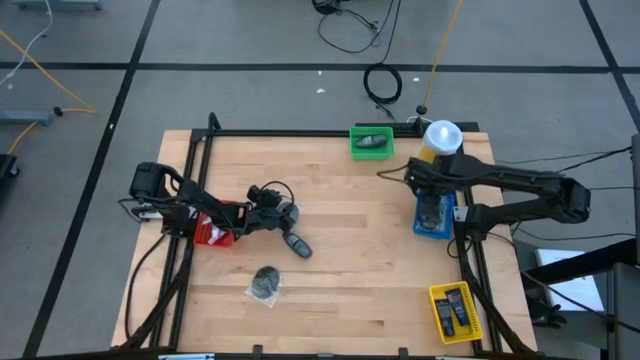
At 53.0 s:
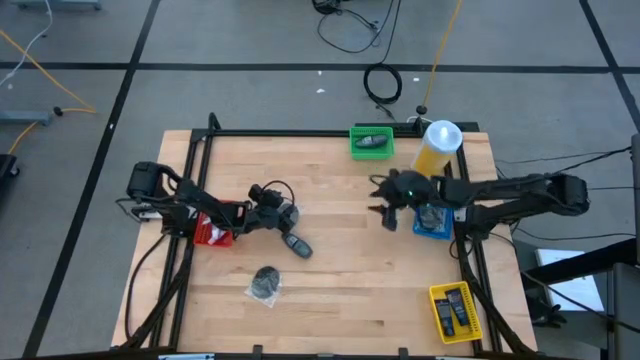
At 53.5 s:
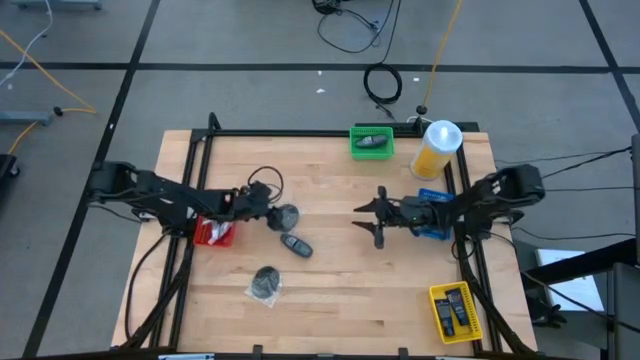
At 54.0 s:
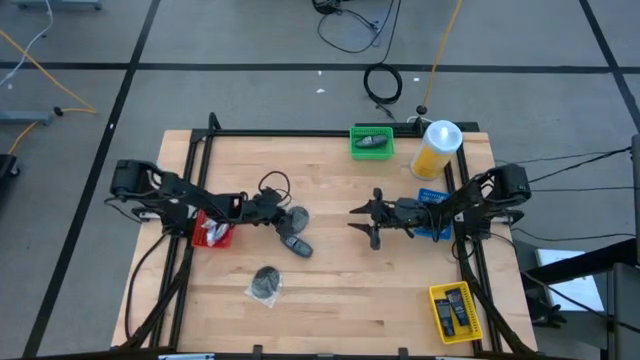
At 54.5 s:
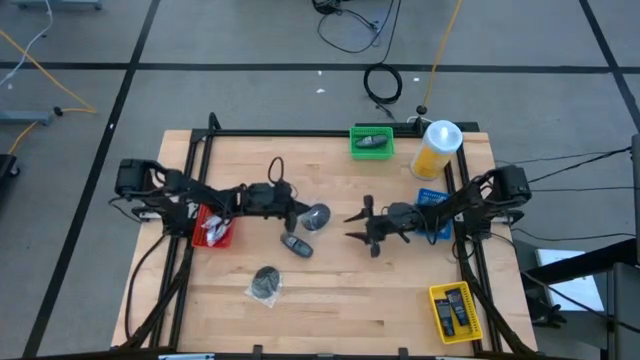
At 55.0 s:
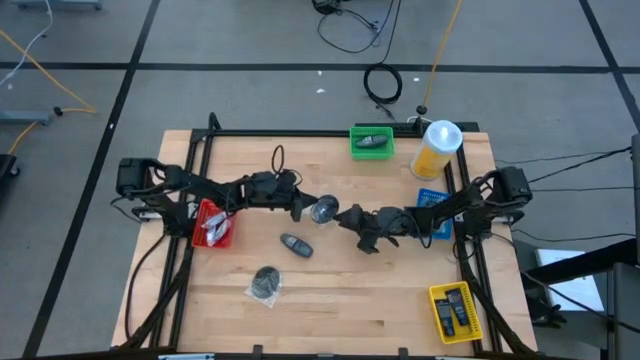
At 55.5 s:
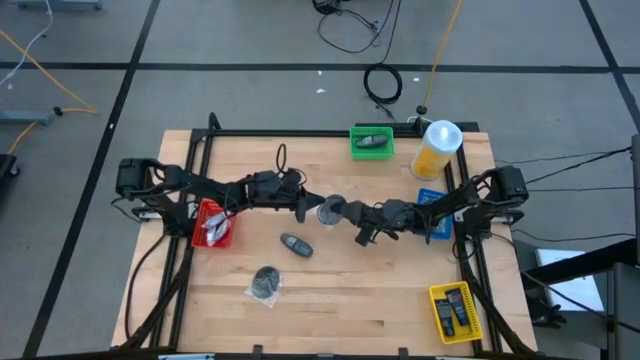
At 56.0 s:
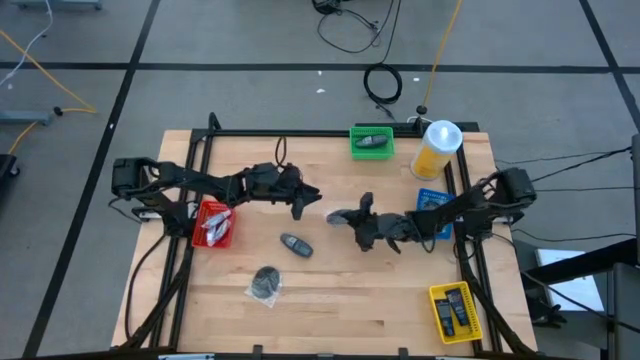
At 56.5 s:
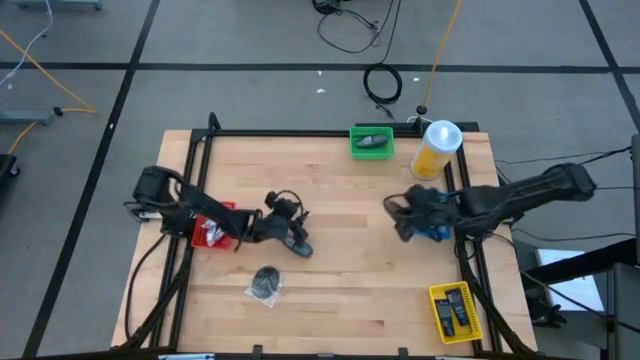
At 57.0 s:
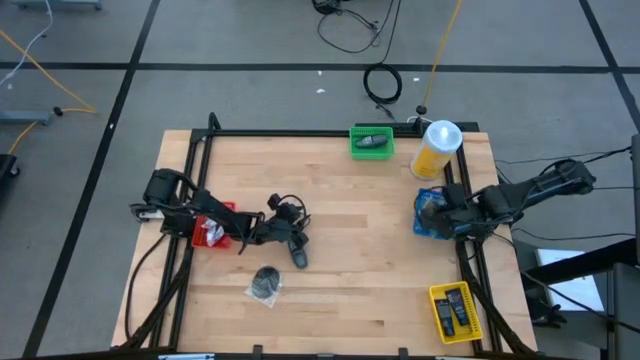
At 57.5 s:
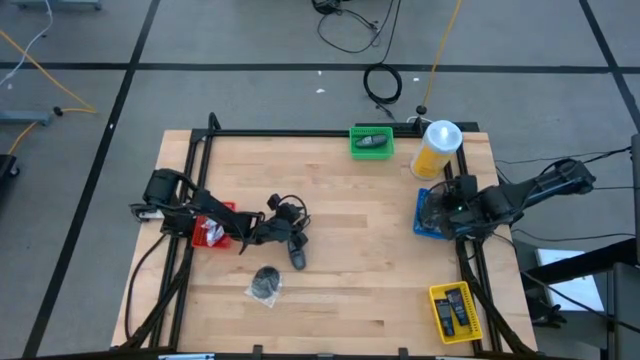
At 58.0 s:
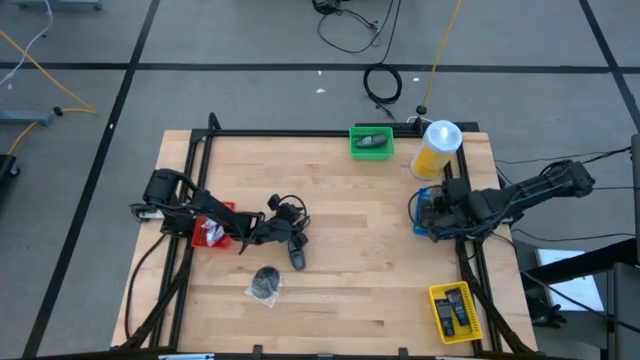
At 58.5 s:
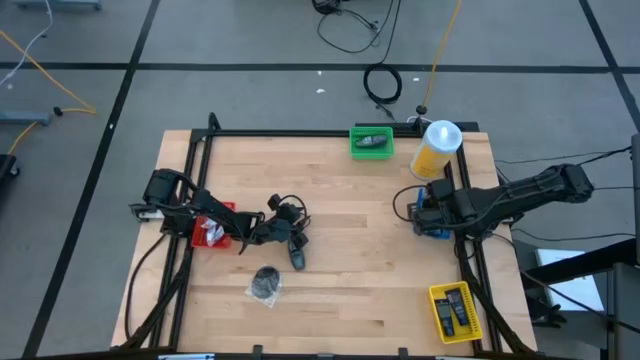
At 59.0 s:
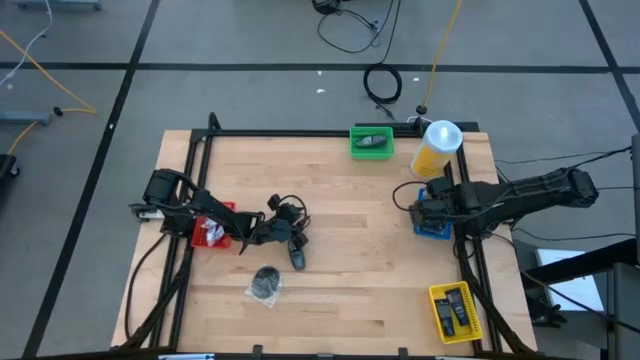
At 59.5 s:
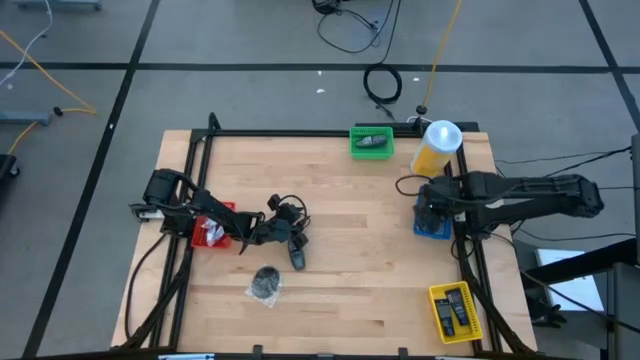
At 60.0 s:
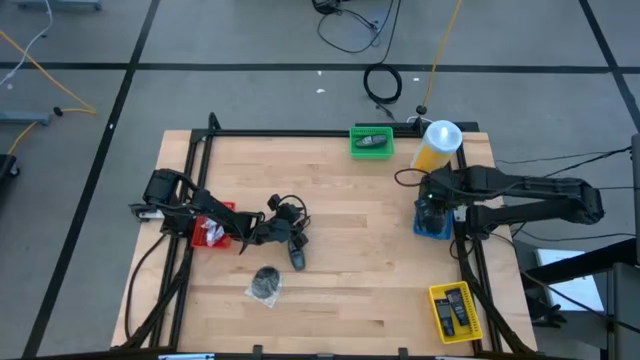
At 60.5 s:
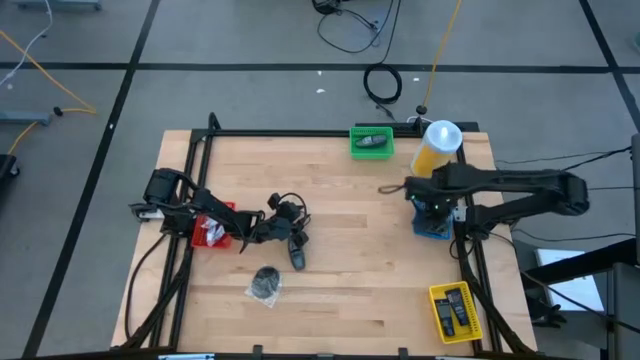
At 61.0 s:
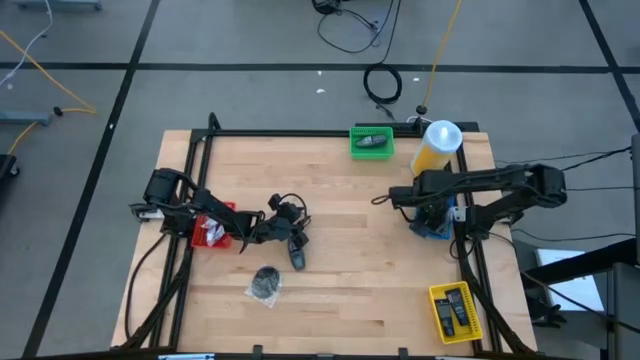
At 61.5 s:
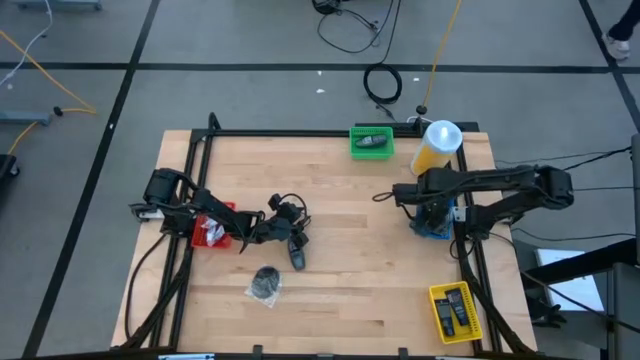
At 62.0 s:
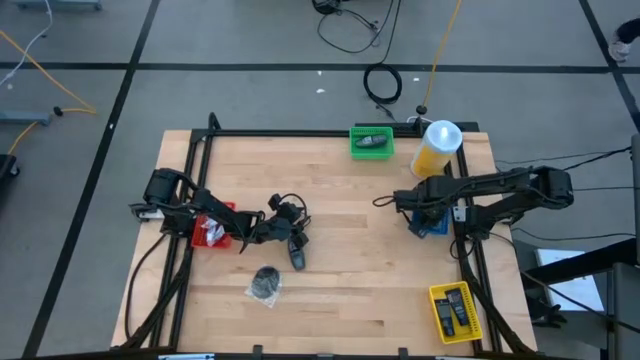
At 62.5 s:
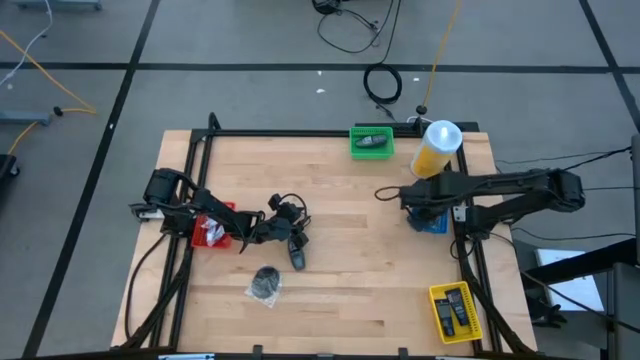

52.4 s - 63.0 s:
Task: Pick & Place Travel size toiletries
Put the black hairbrush into the blue bin

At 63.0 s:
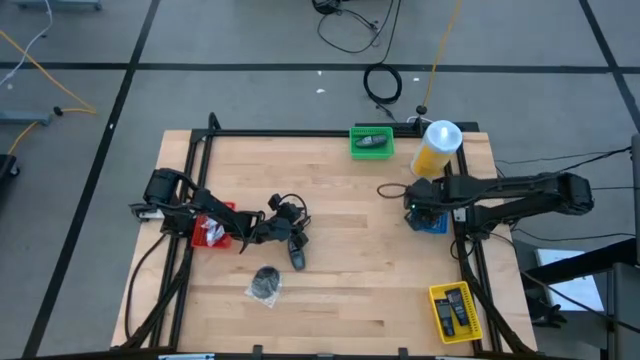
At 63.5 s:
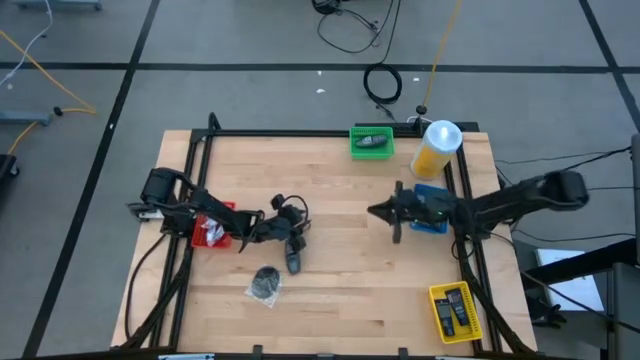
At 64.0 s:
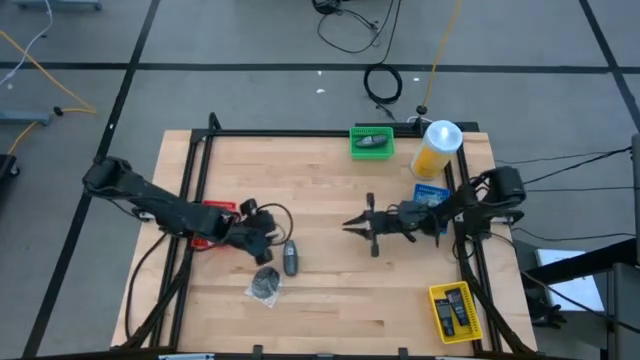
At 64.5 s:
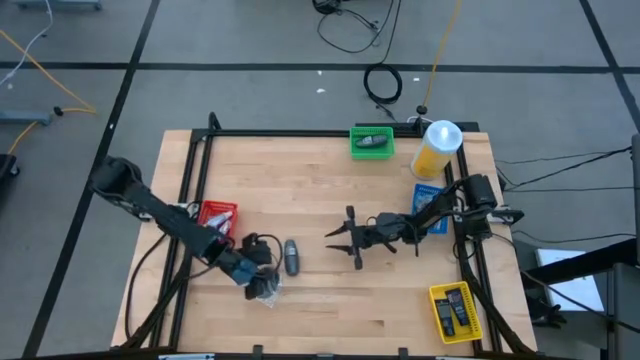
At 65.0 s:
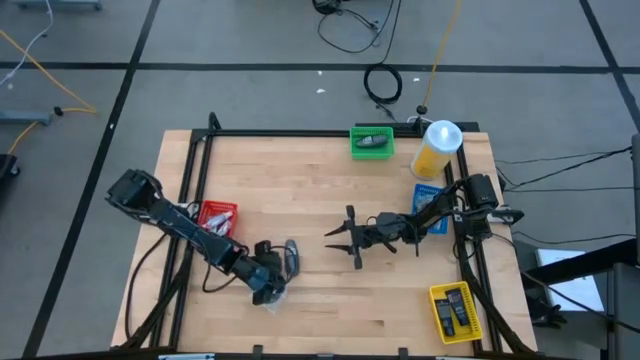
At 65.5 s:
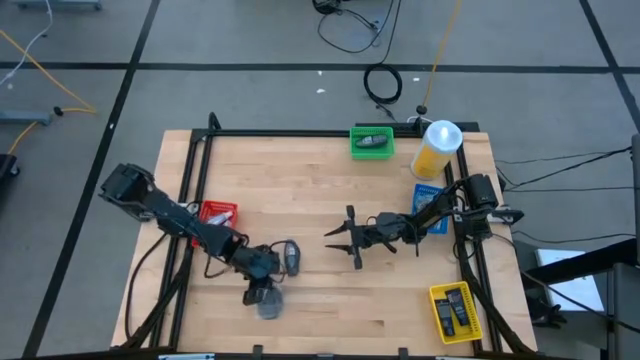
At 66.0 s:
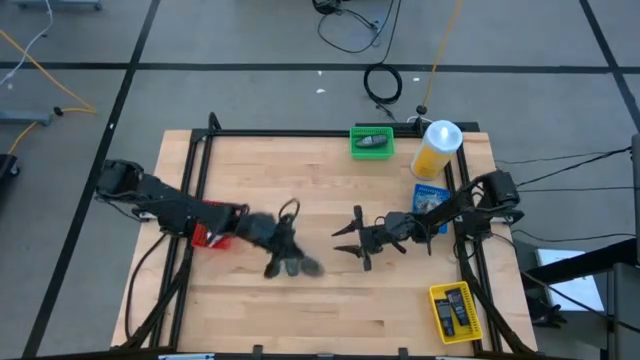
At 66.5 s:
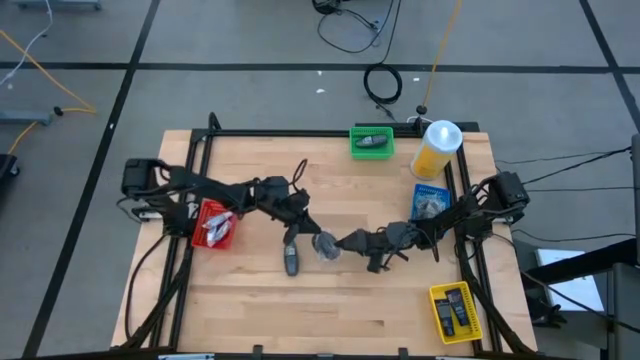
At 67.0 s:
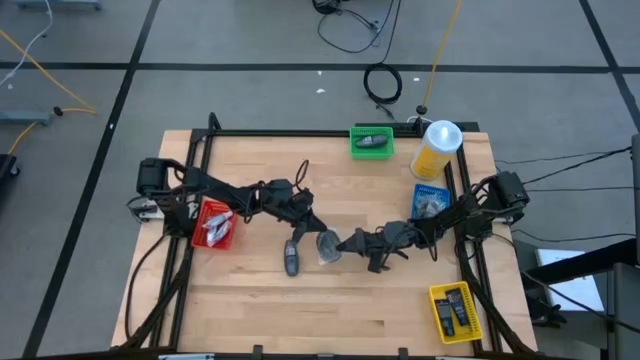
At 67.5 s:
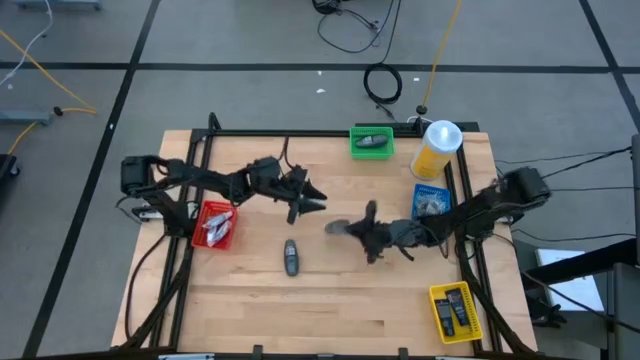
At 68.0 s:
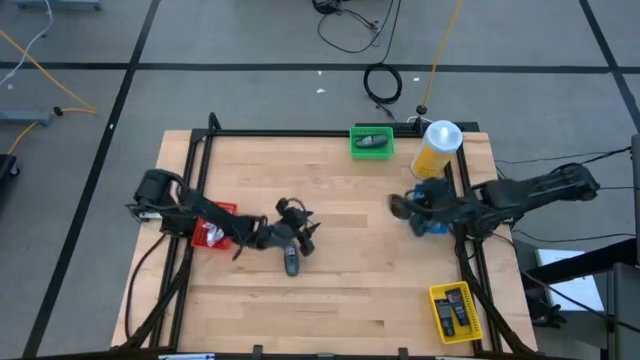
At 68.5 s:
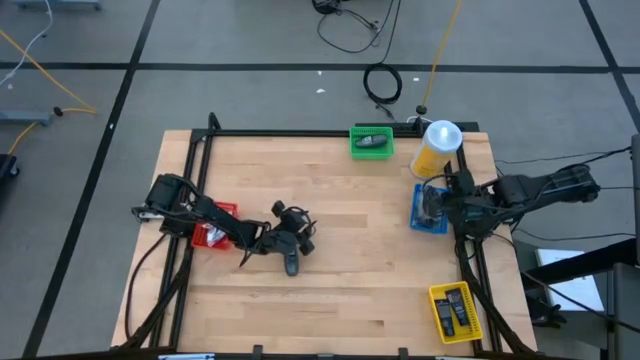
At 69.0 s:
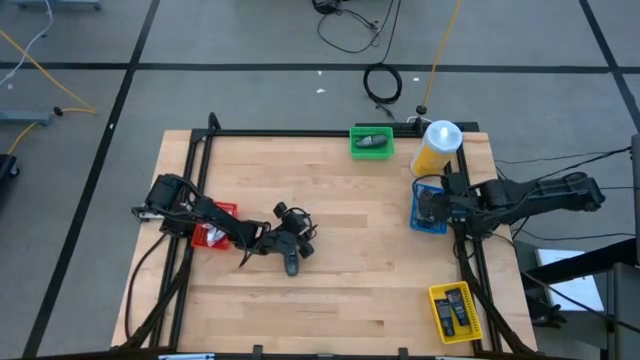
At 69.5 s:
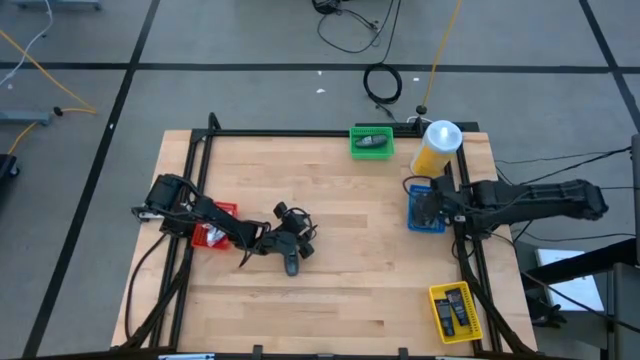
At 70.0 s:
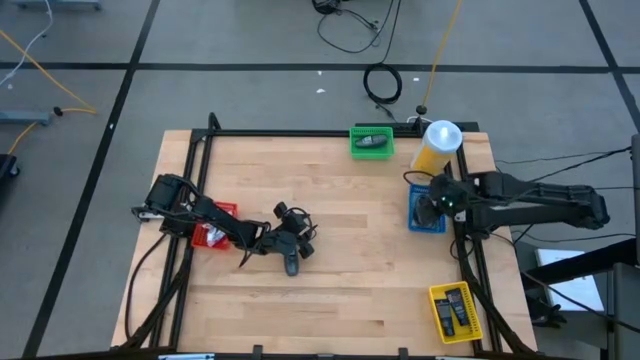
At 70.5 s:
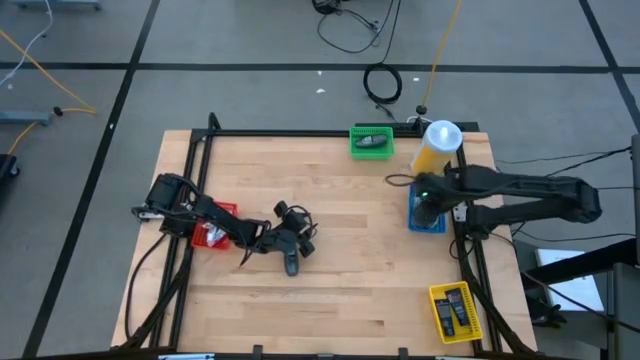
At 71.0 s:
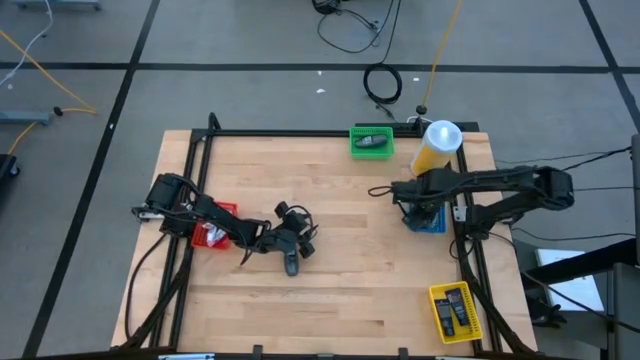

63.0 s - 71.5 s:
Put the black hairbrush into the blue bin

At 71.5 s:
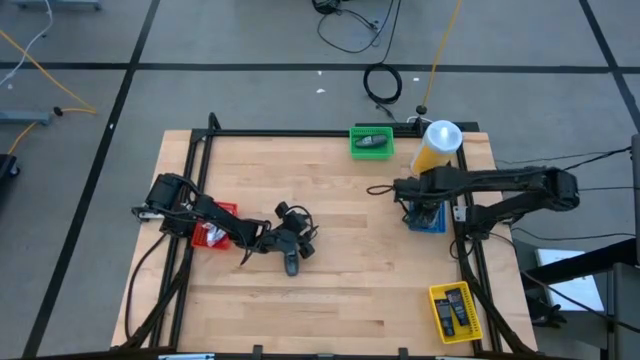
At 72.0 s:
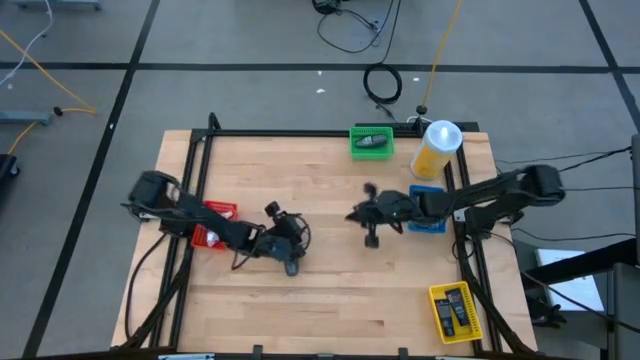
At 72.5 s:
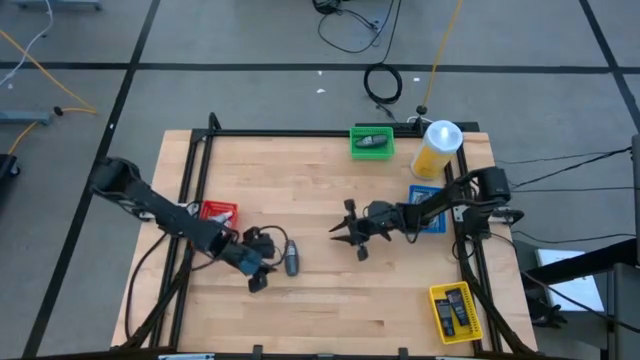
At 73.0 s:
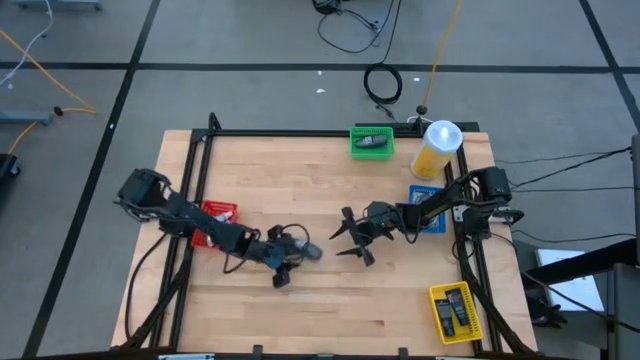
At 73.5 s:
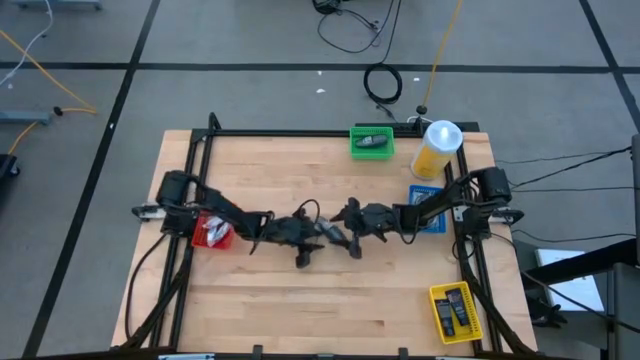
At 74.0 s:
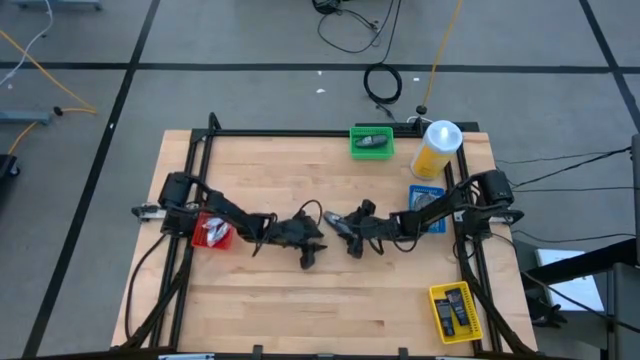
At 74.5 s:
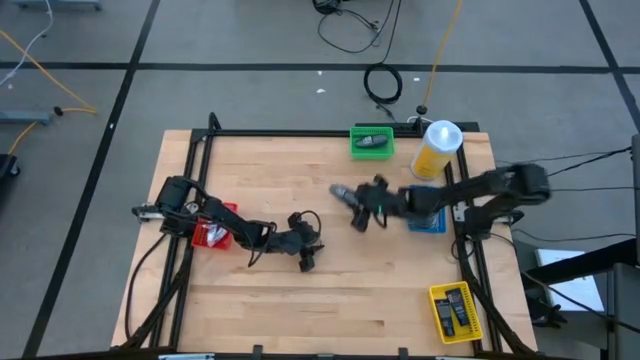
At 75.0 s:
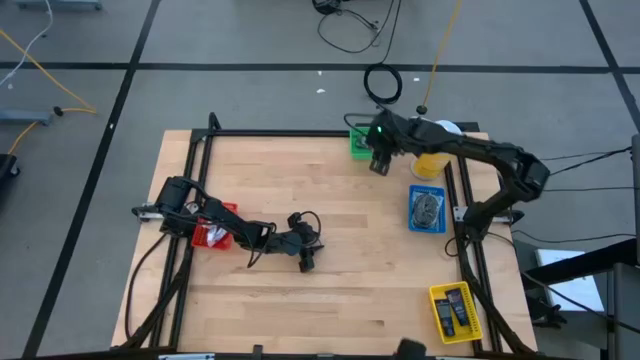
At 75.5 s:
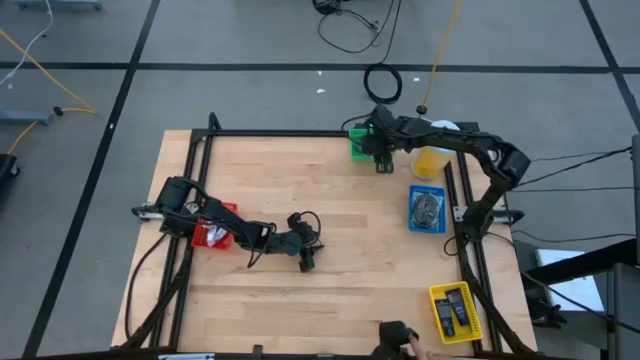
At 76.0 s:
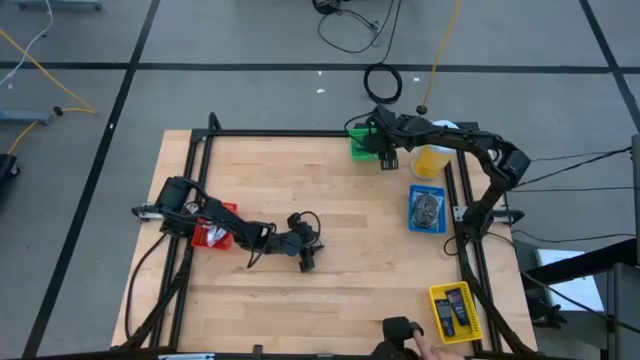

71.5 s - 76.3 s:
Put the gray deodorant into the green bin
